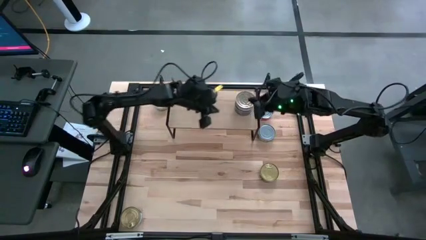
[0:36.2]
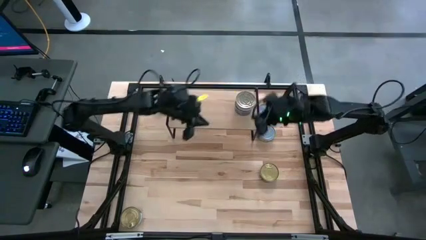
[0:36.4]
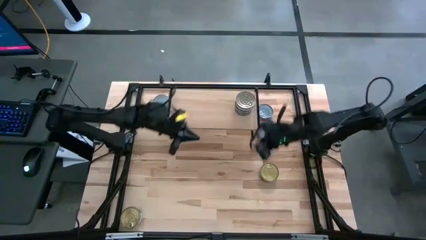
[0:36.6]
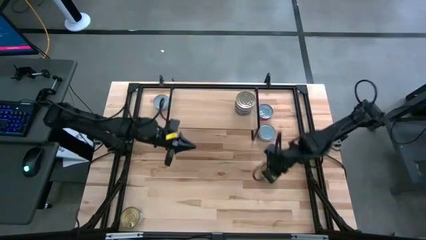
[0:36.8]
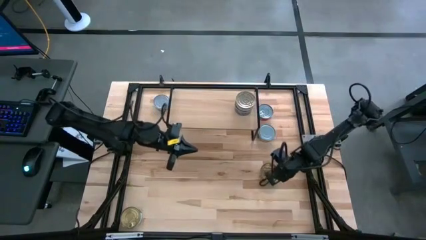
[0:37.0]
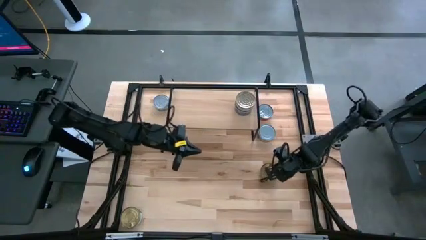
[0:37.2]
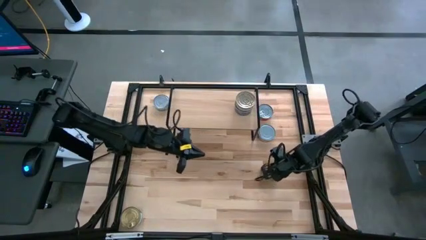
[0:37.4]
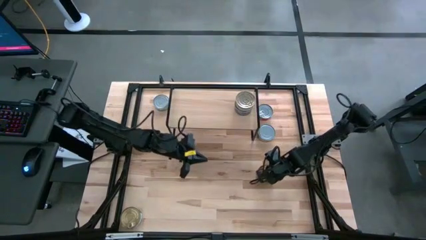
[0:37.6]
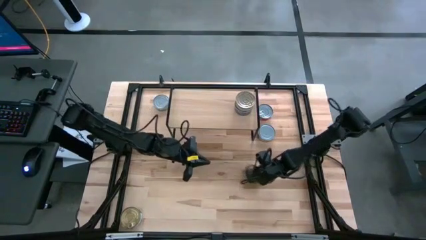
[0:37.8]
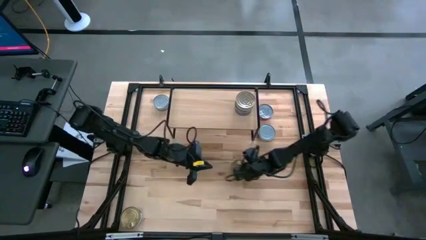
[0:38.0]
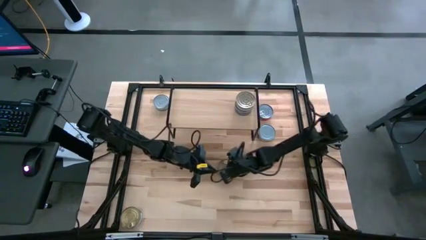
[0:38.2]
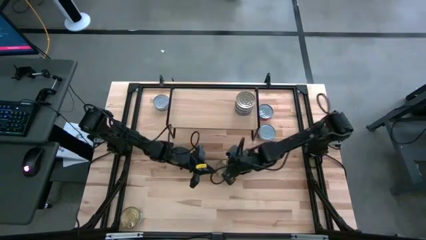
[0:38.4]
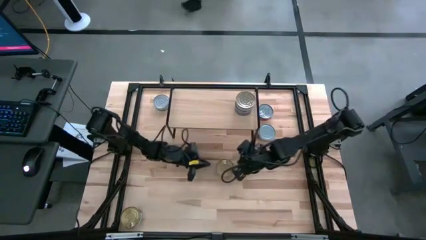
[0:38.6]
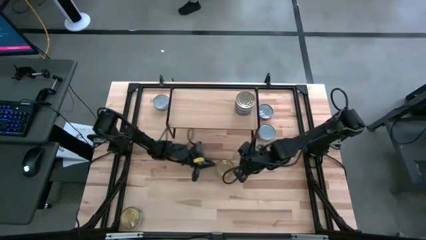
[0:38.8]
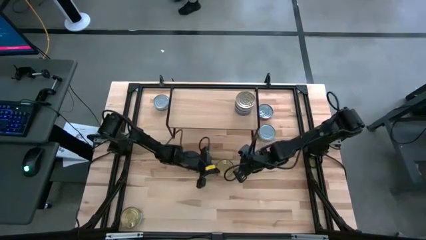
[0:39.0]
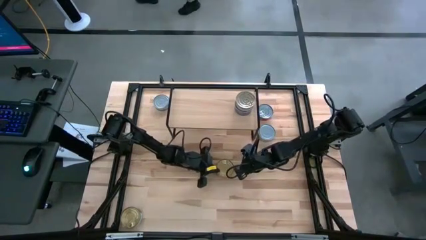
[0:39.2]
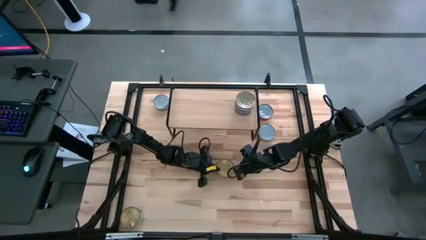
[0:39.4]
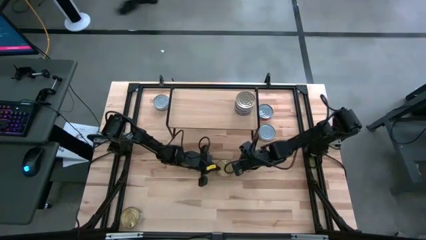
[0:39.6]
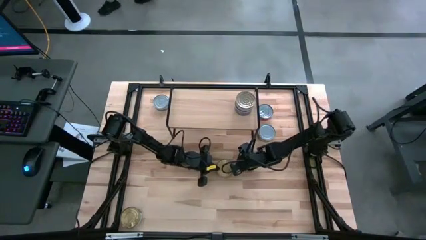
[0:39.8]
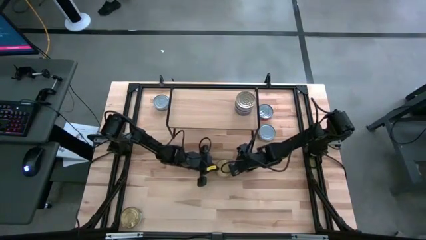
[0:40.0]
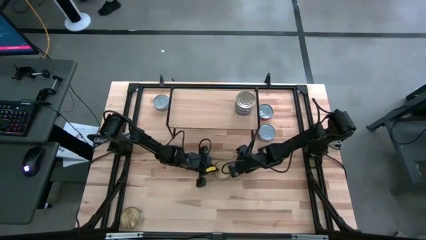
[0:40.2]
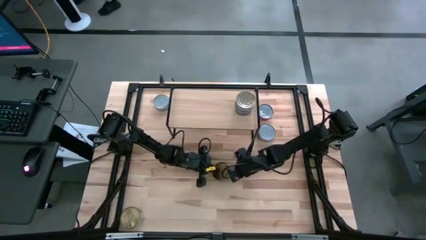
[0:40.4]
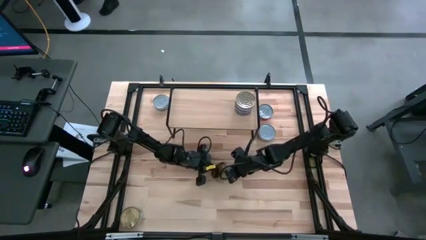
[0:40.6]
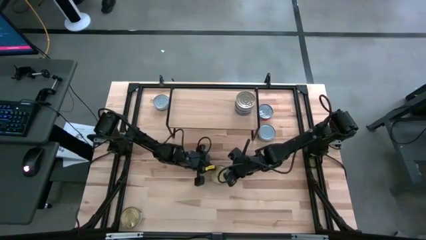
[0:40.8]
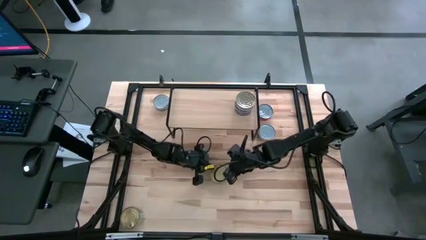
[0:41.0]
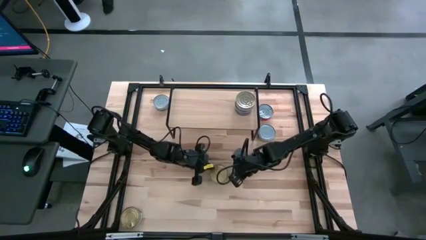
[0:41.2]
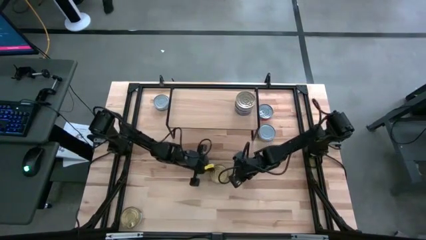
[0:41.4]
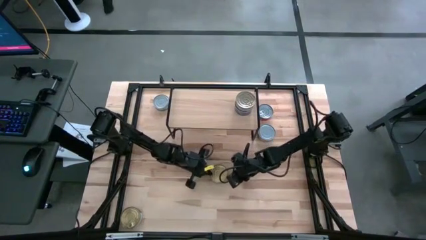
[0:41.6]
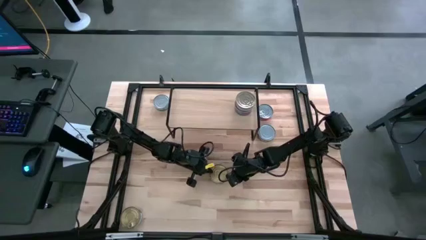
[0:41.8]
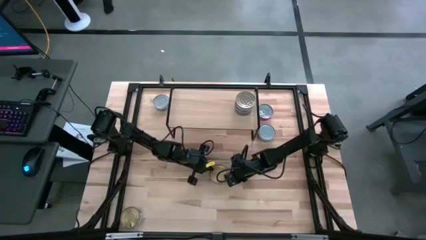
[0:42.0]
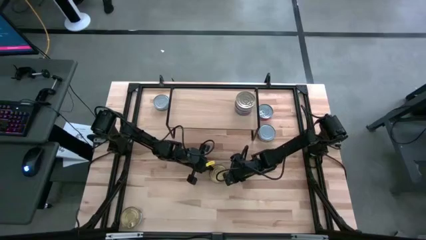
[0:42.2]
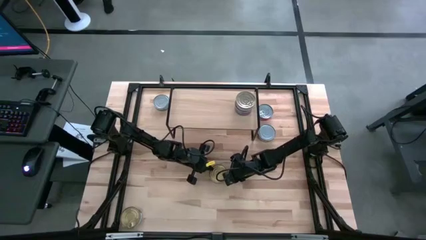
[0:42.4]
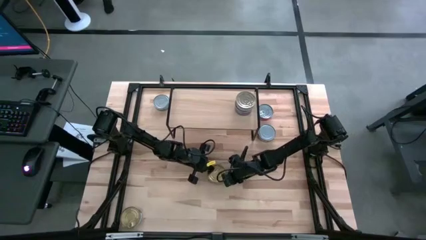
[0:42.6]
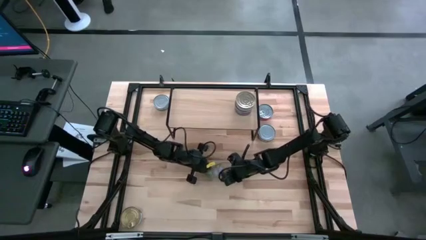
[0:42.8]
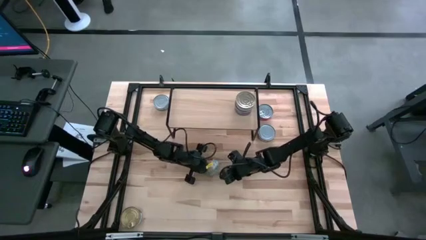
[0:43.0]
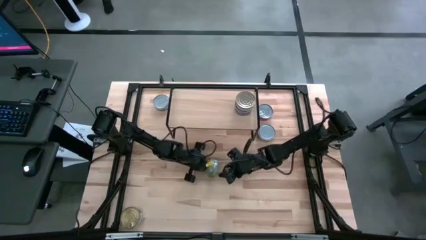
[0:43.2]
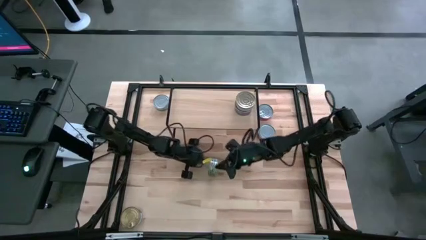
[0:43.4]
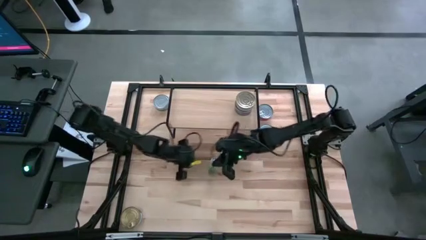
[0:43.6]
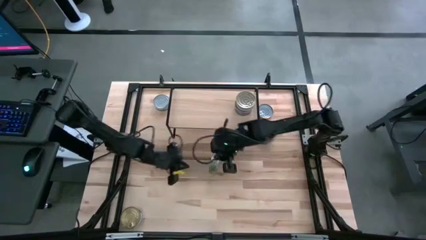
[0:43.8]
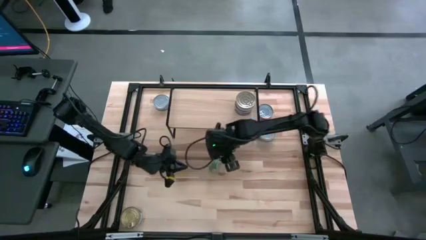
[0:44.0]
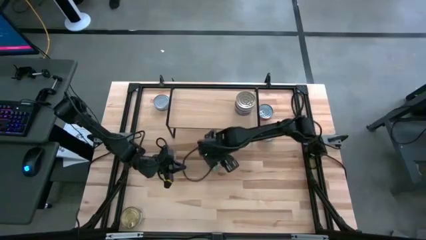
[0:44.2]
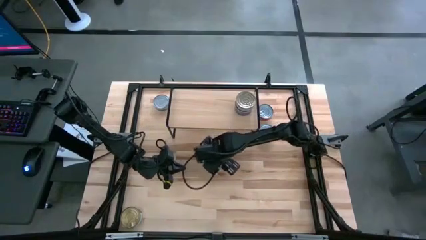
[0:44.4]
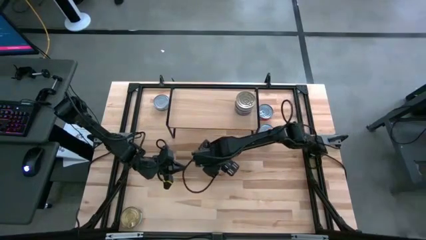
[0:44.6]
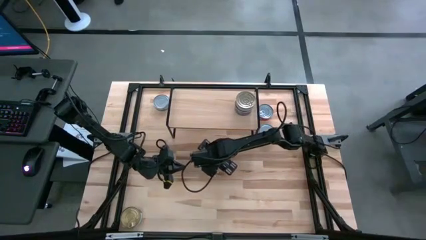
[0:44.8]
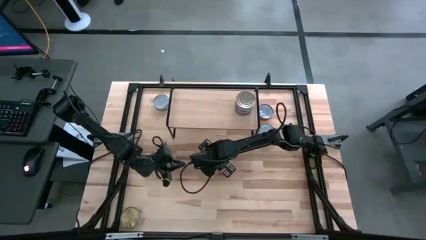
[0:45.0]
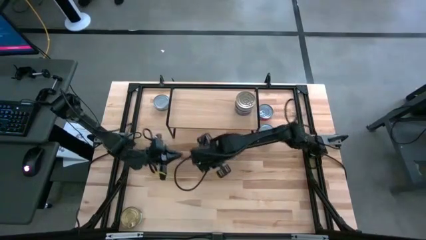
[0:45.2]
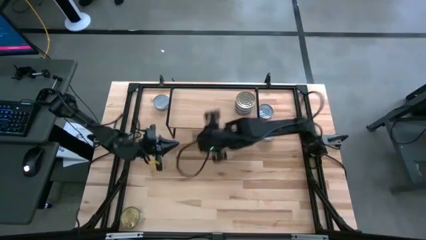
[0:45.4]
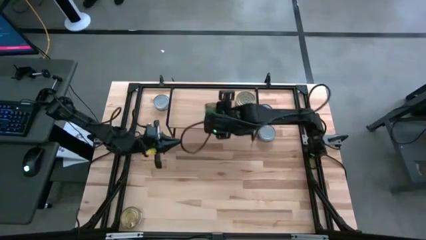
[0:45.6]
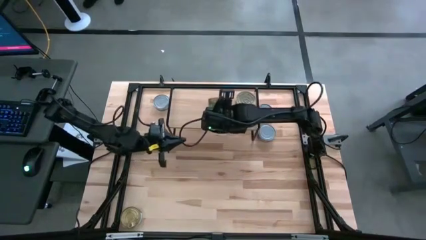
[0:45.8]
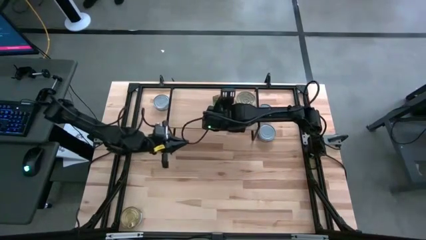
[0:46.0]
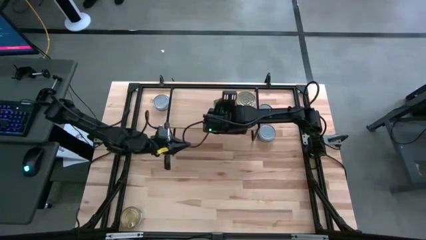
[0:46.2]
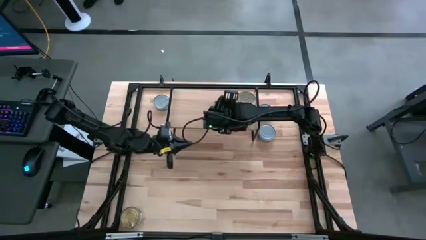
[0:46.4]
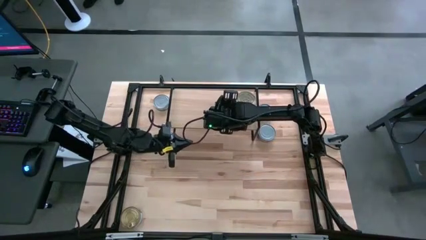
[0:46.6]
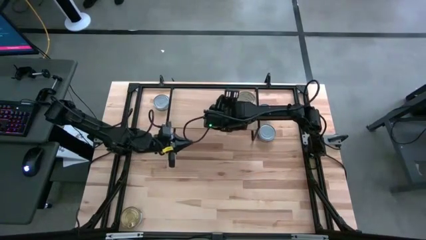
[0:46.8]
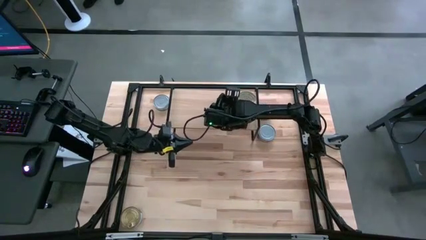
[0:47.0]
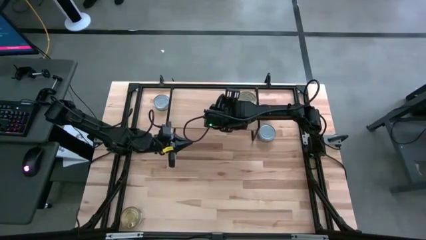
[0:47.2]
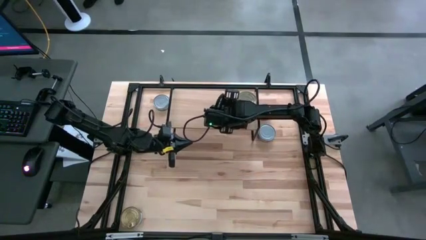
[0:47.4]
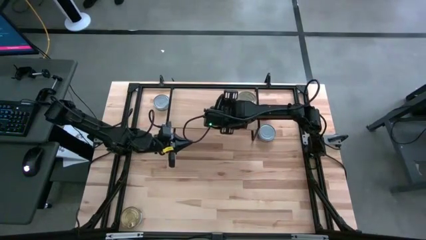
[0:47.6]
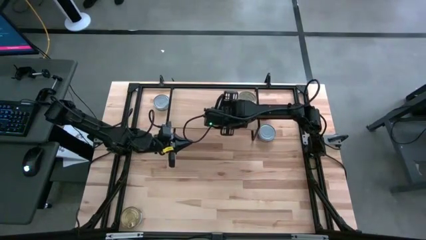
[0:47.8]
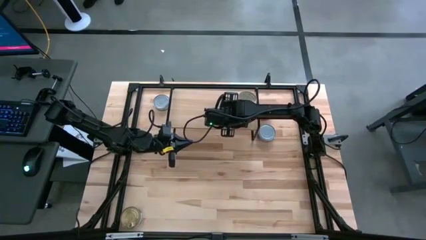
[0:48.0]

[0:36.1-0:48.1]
Task: Stack canned seafood by type on shelf
Put the top green tuna can on the shelf

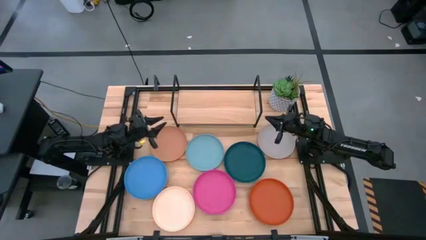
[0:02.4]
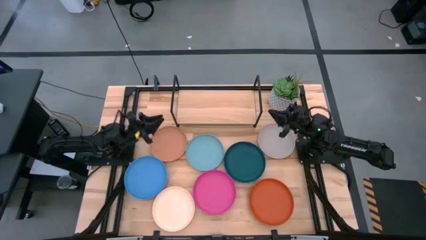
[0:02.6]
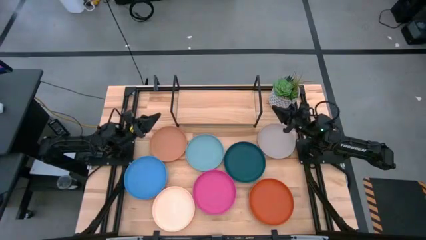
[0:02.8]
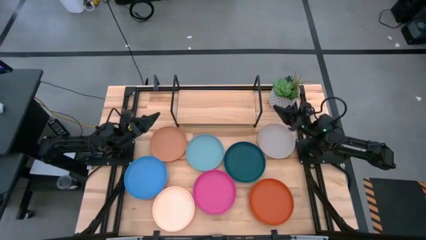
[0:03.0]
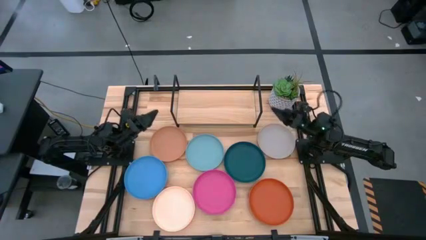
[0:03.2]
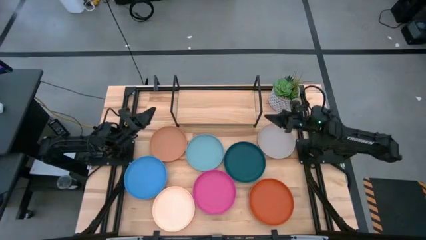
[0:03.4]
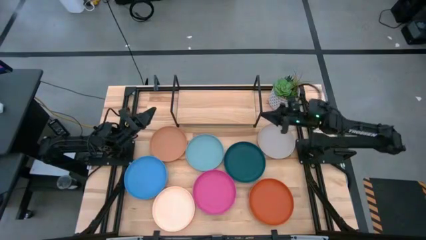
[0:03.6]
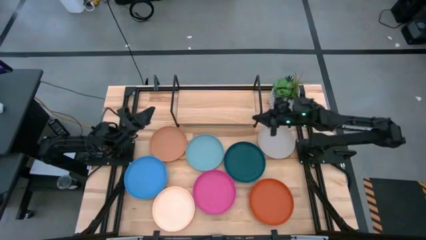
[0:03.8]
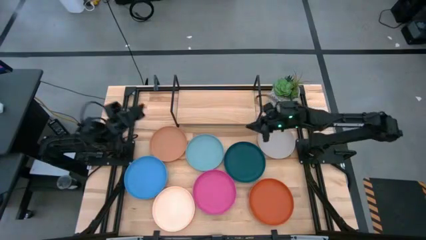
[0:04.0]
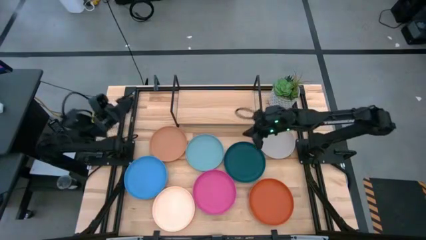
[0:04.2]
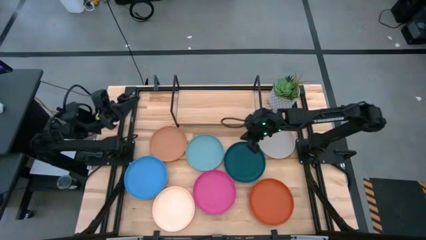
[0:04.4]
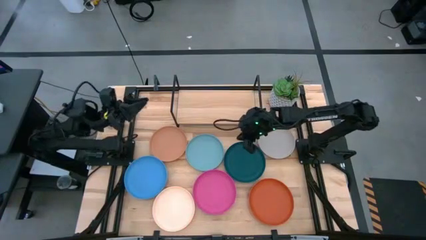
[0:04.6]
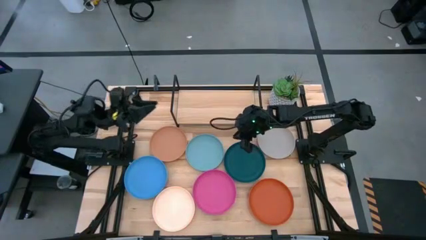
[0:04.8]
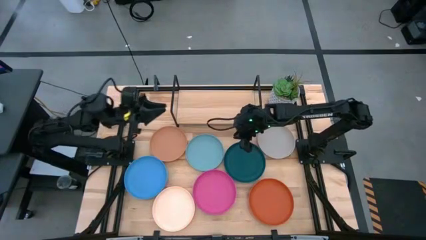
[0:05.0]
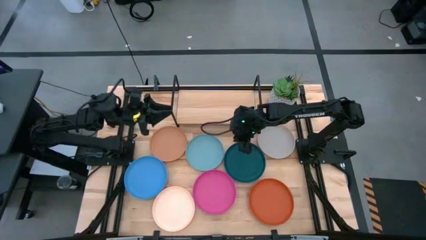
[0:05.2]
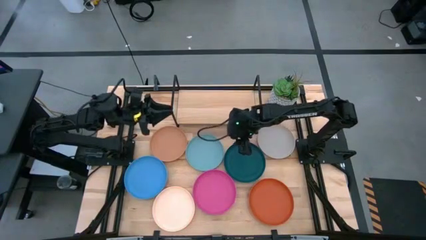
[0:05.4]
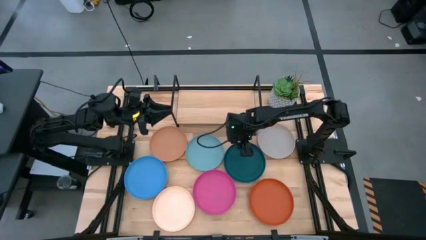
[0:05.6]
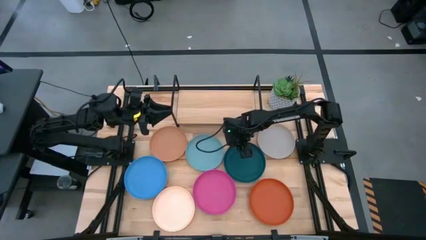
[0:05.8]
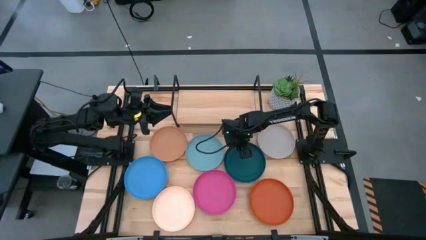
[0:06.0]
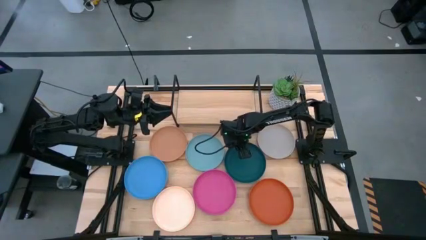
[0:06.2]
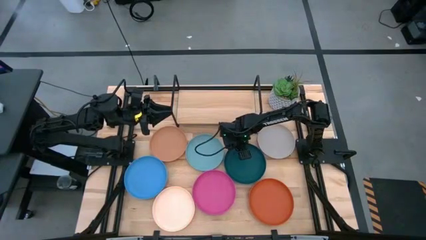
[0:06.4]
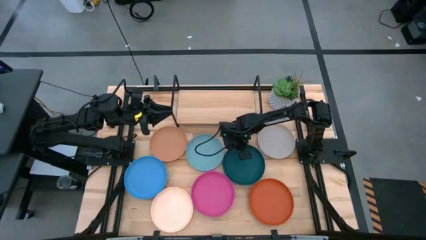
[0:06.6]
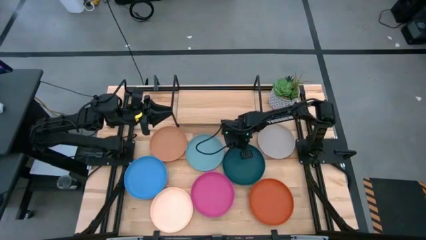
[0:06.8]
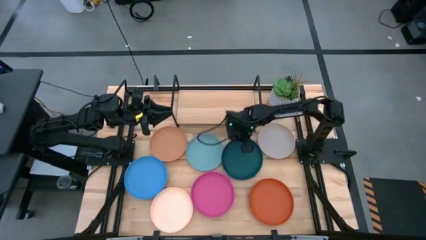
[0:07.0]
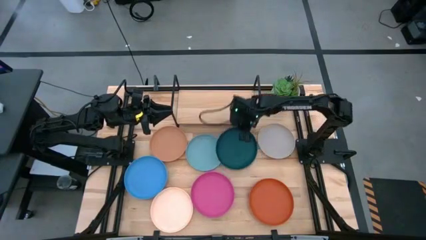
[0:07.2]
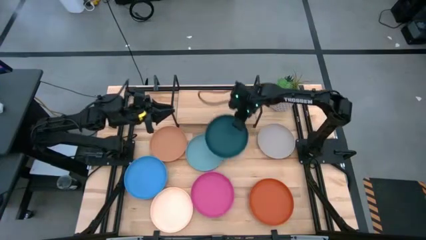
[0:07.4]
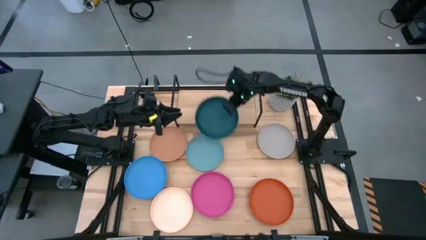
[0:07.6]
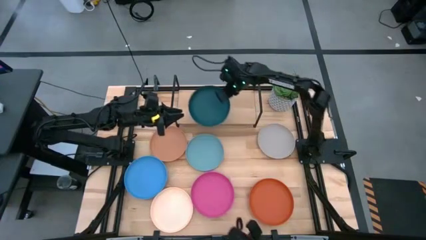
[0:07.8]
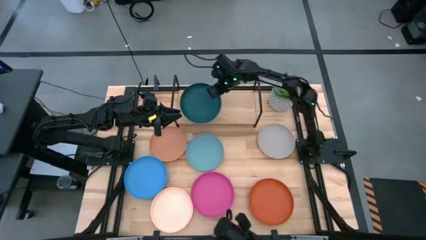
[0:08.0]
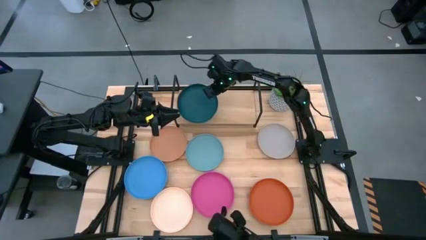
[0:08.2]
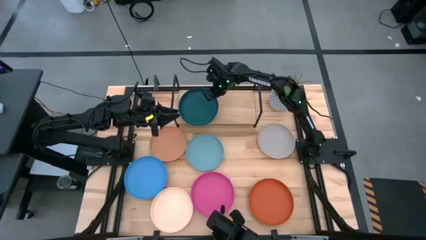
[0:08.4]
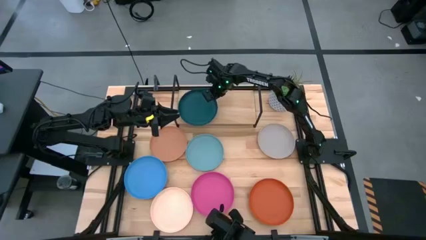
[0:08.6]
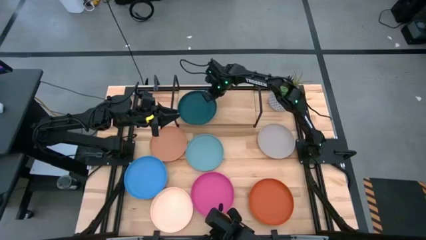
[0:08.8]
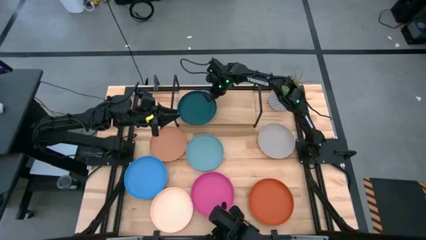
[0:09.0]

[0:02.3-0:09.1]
Task: Place and stack plates onto a shelf
Put the dark blue plate on the shelf
